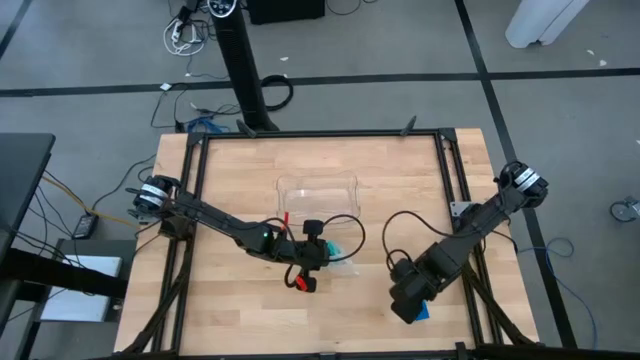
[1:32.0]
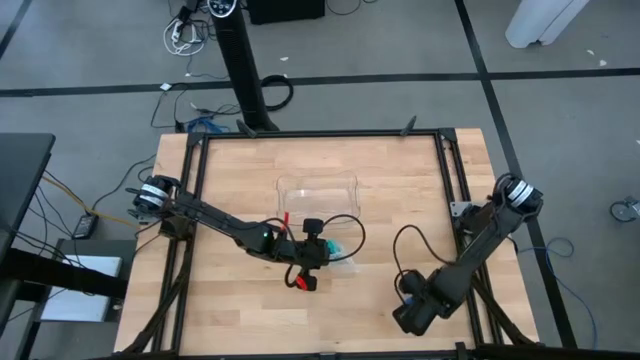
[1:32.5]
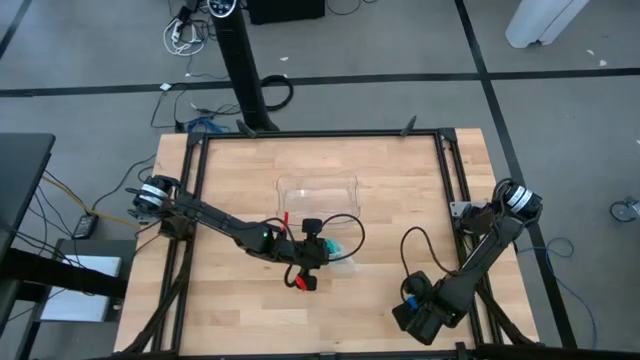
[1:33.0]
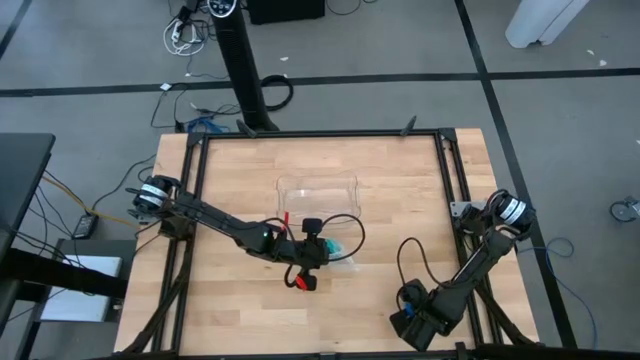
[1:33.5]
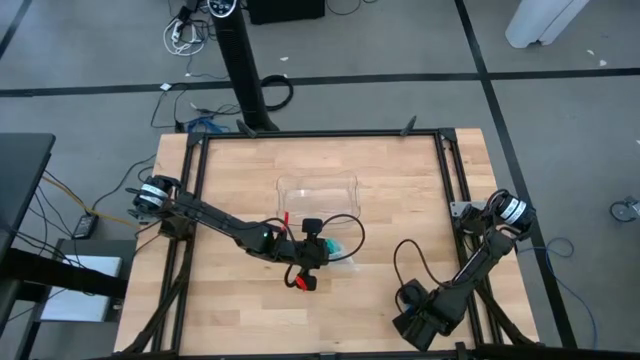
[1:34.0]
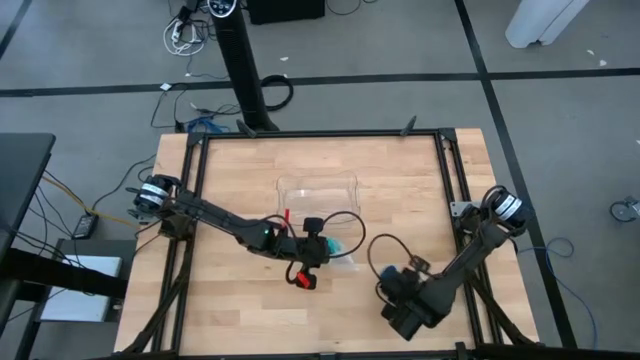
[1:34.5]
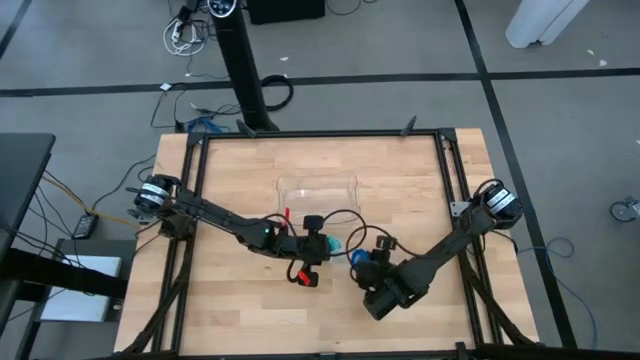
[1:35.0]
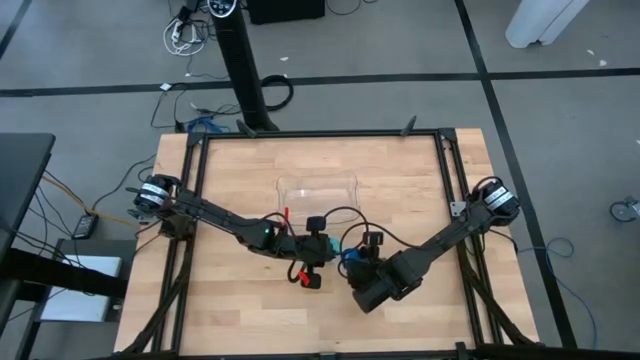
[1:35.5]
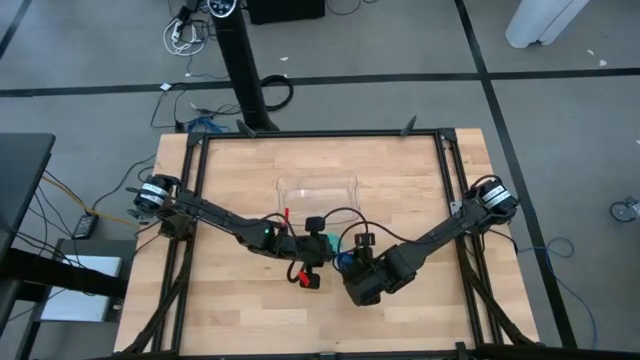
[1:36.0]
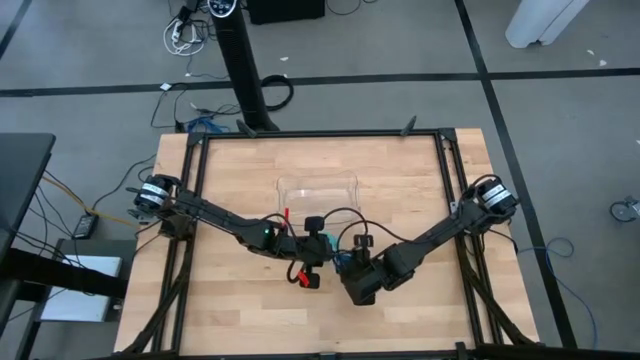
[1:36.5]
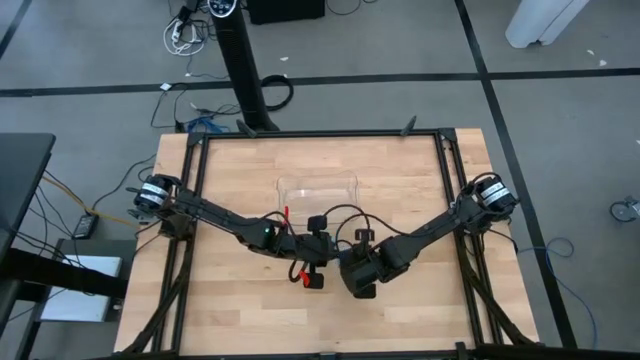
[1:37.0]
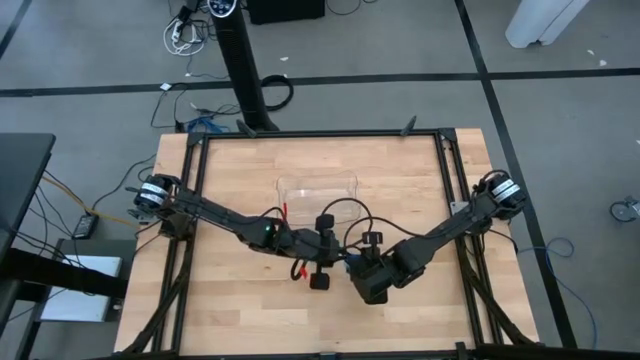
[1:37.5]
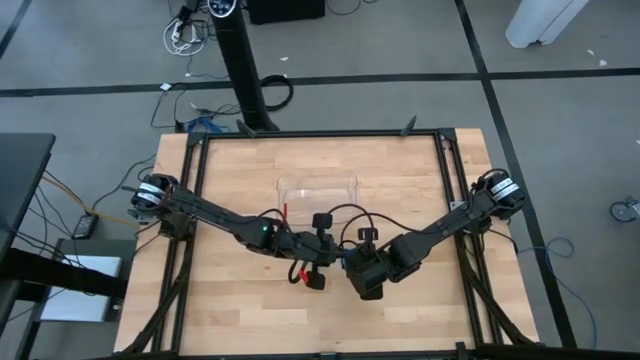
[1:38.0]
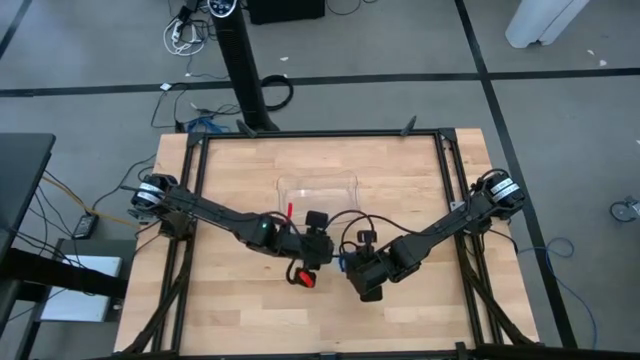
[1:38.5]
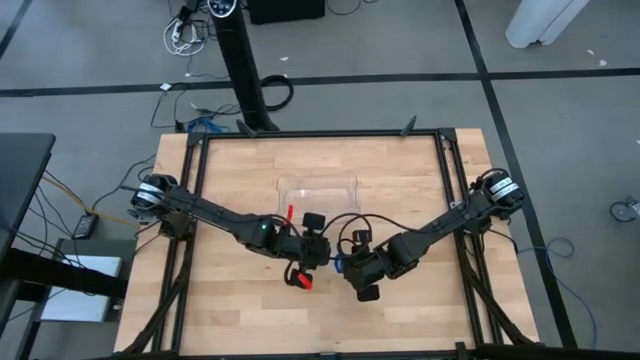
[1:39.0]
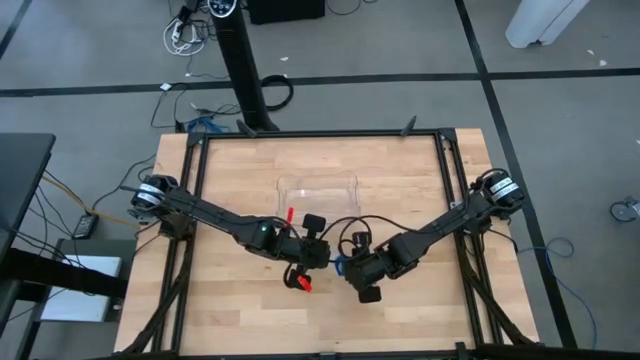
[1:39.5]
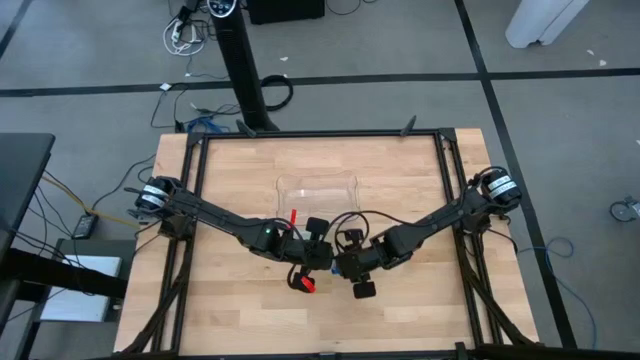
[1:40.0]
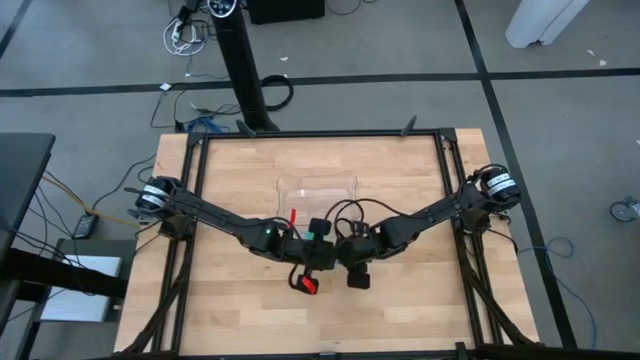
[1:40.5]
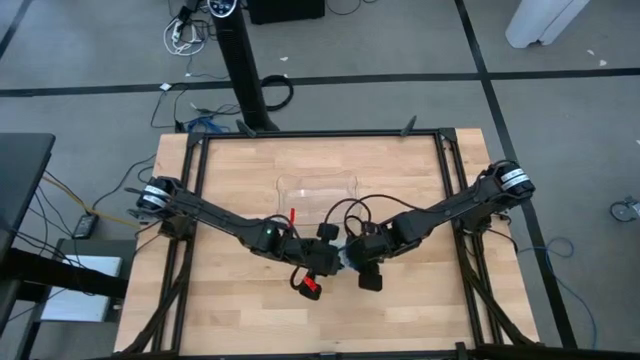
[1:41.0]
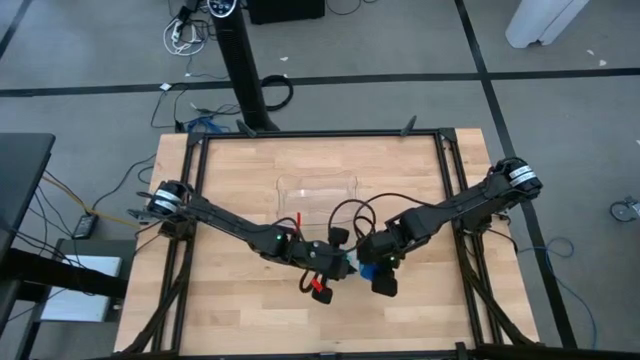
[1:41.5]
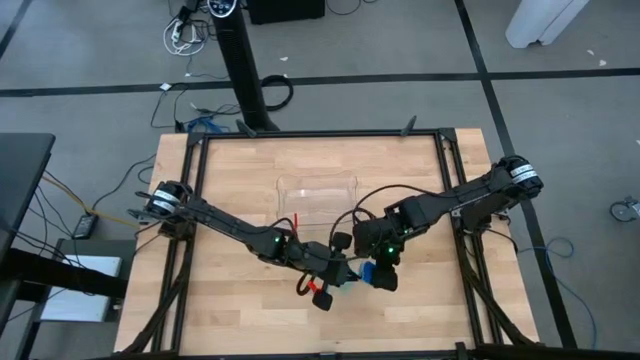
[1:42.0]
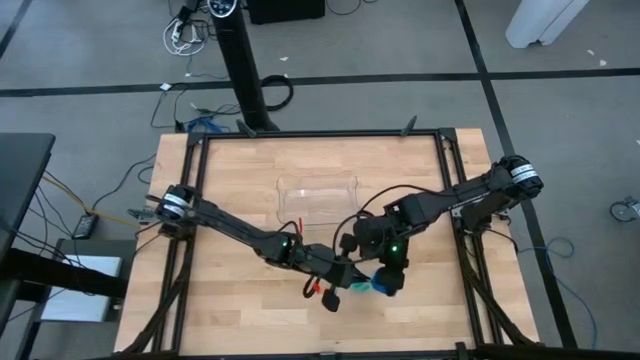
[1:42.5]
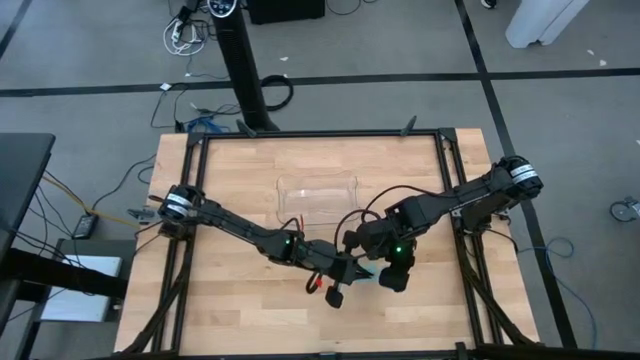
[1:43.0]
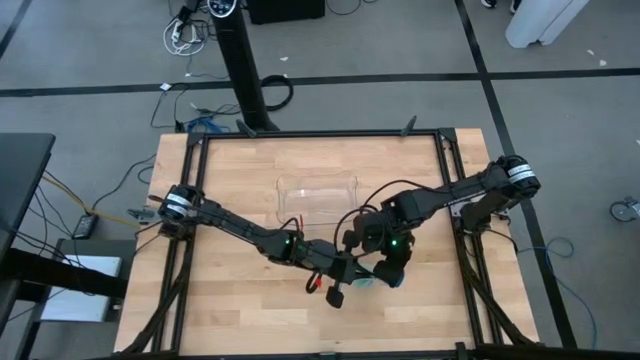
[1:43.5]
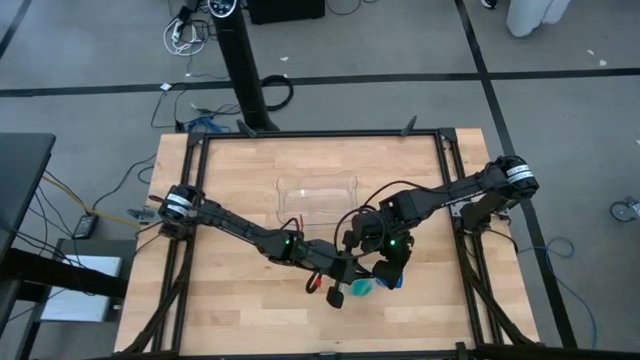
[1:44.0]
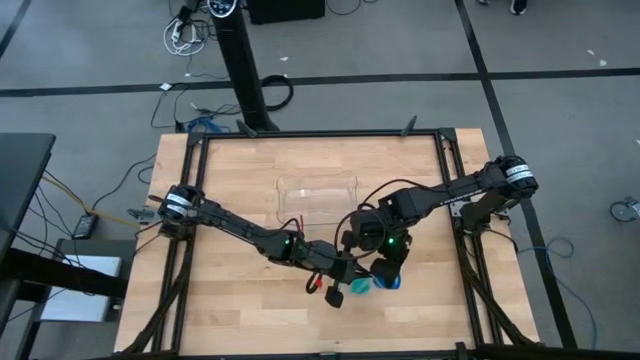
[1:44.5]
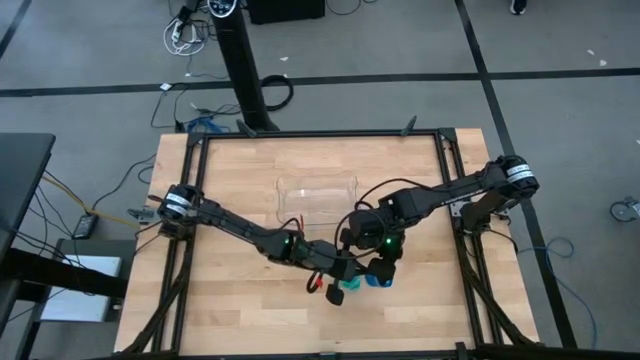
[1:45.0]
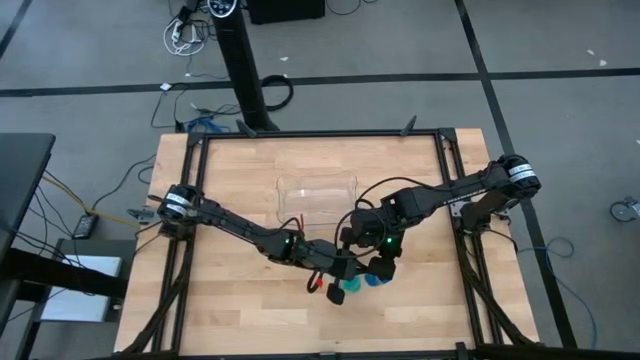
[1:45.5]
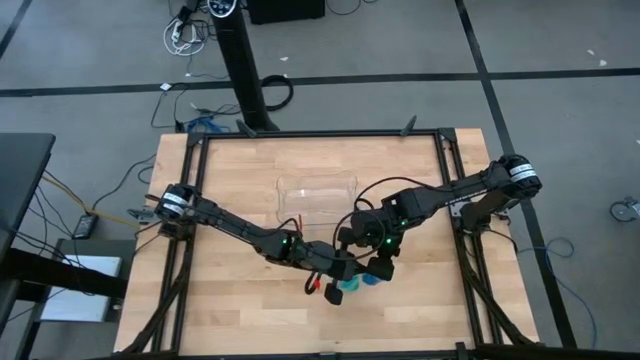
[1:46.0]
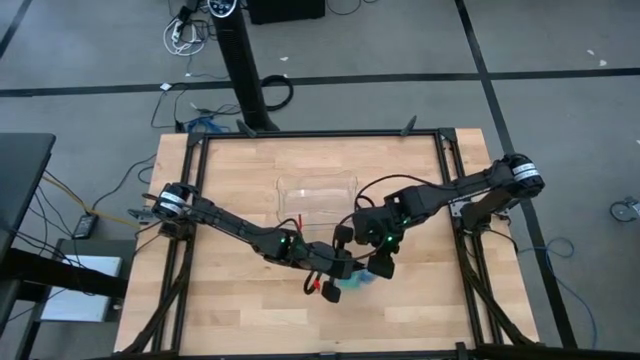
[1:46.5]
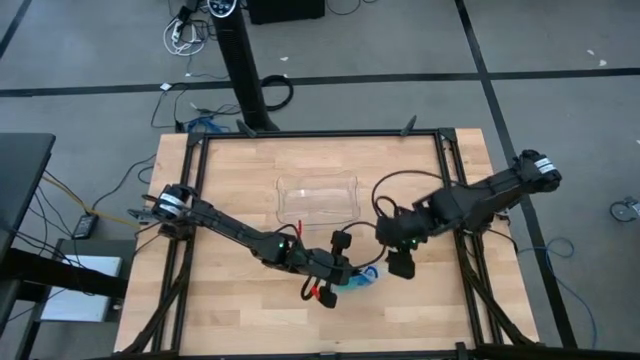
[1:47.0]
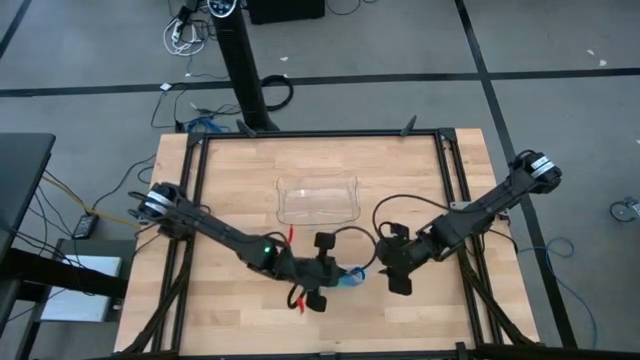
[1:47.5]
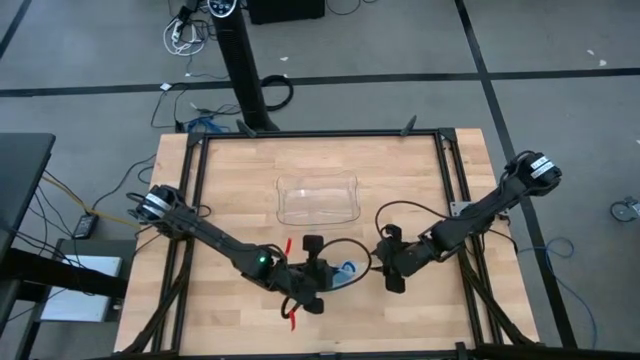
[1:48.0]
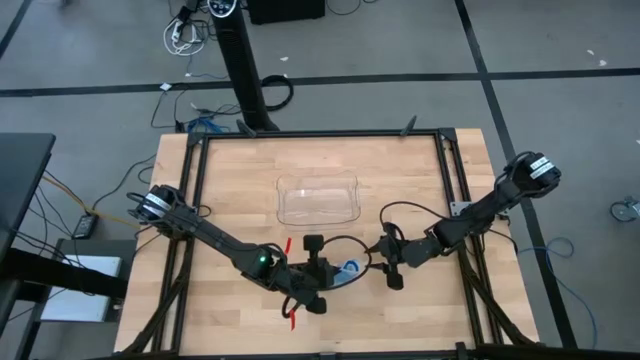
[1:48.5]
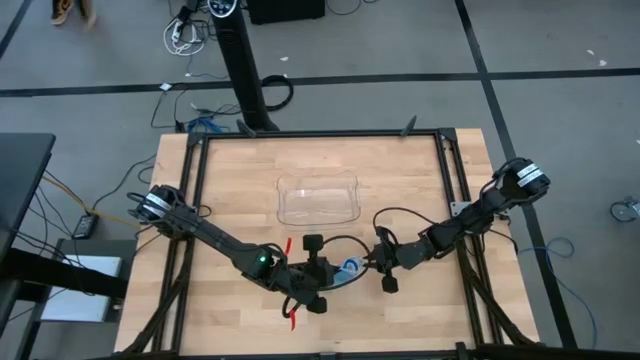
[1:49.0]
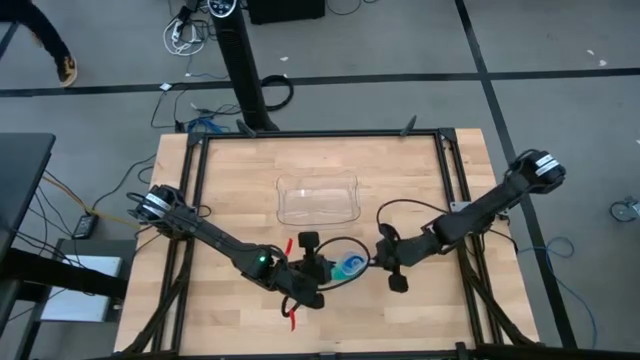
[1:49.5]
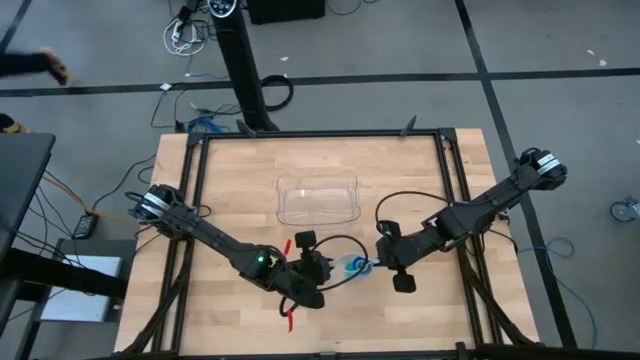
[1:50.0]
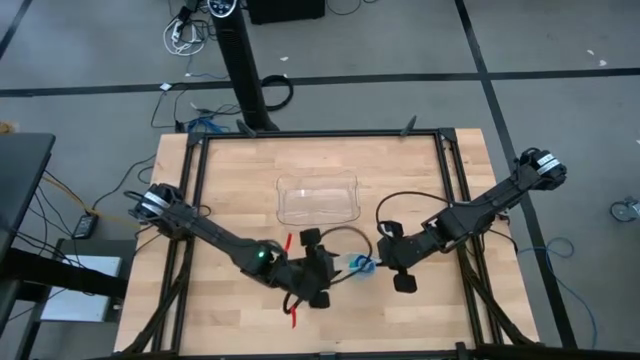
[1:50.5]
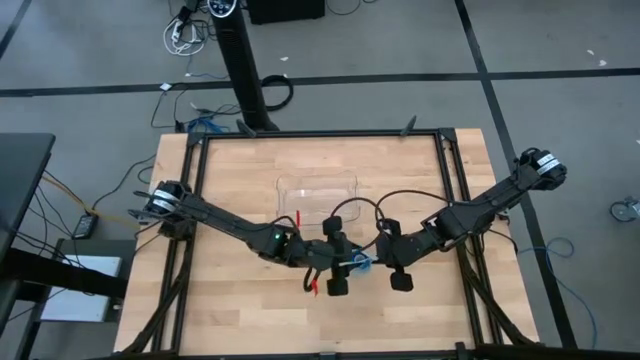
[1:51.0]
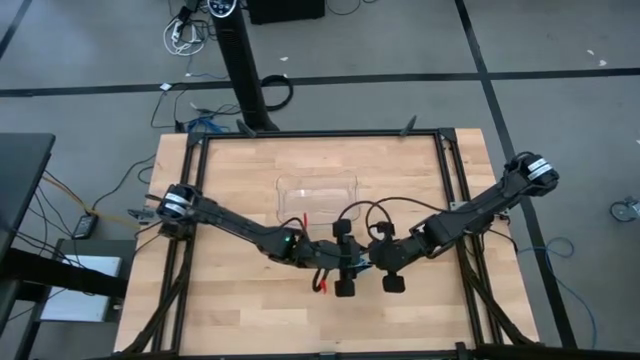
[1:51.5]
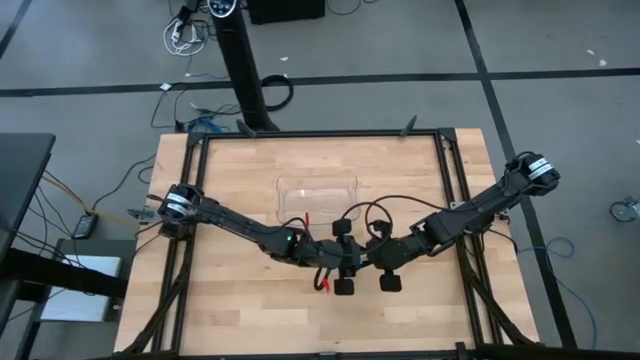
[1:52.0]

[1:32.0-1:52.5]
Task: Roll bandage
Put the rolled blue bandage into the transparent zip bag

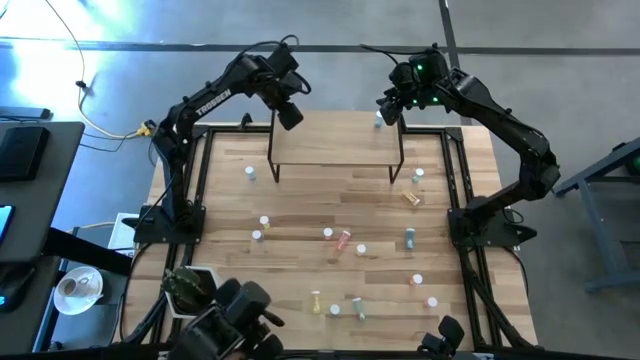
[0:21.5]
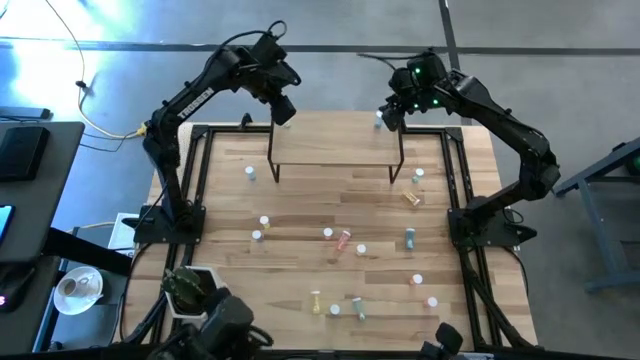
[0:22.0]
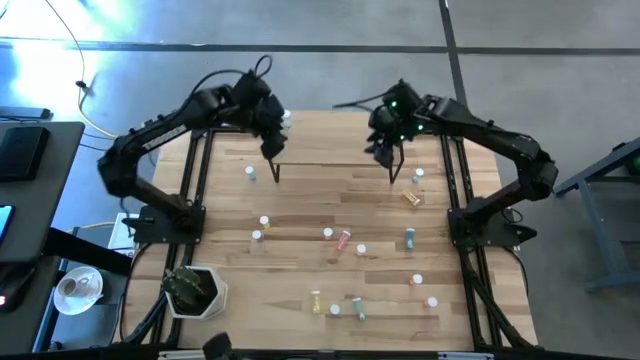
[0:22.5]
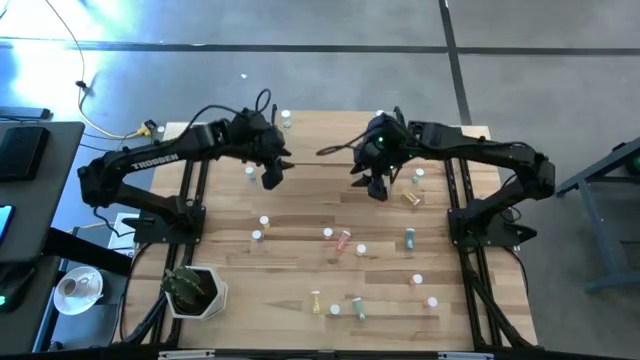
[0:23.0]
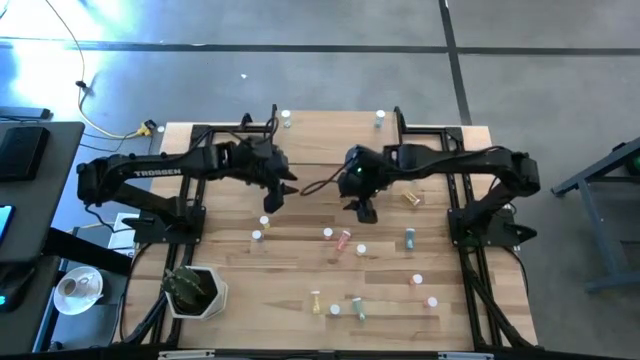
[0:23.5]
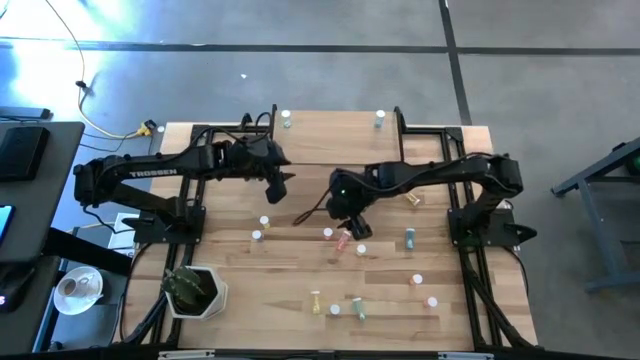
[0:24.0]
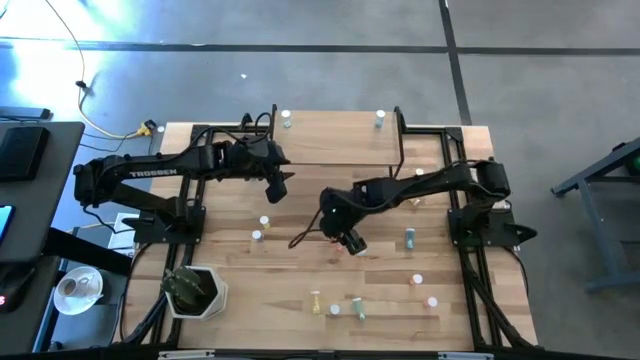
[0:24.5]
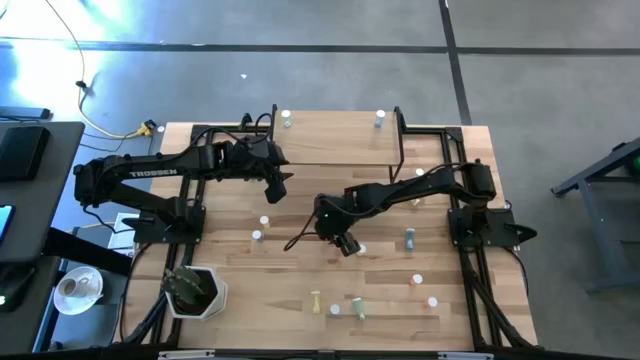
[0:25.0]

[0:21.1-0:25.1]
Task: Pick and place medicine bottles onto shelf by color
Put the pink pill bottle on the shelf
